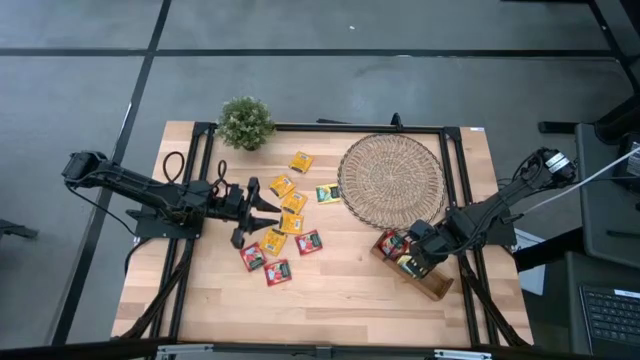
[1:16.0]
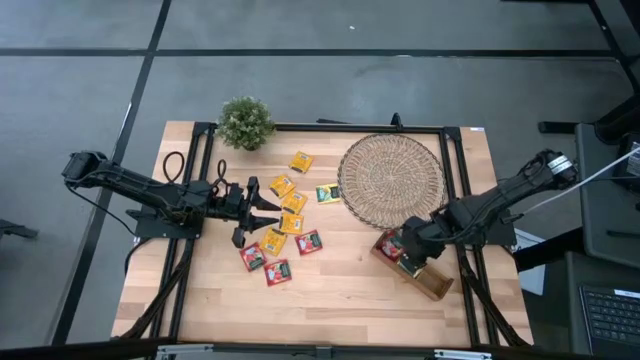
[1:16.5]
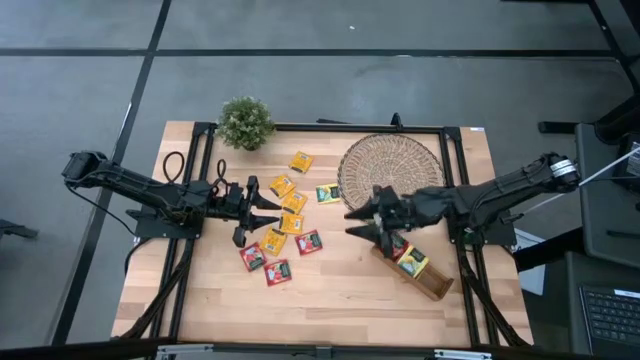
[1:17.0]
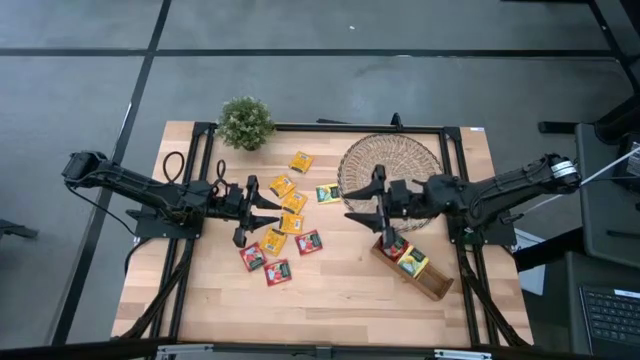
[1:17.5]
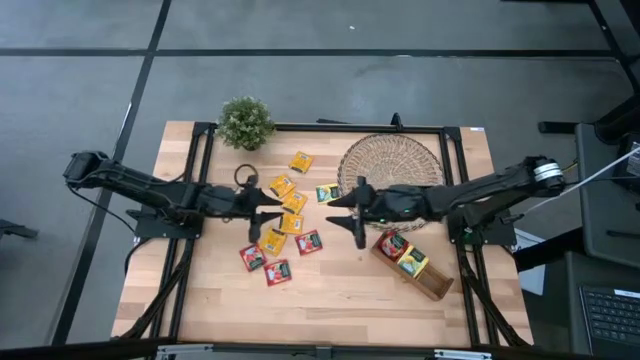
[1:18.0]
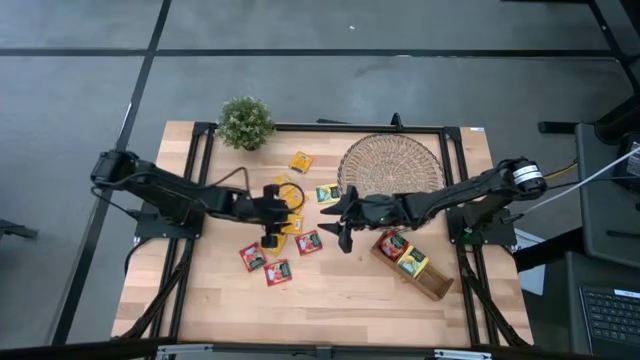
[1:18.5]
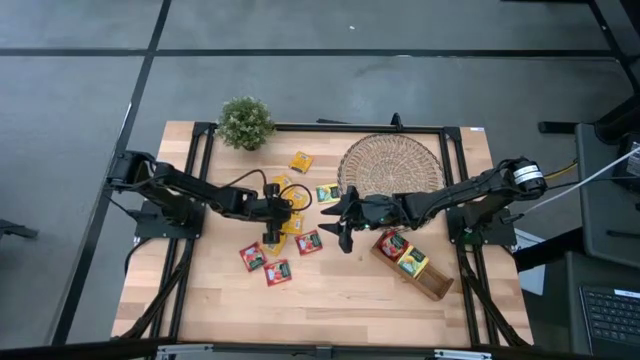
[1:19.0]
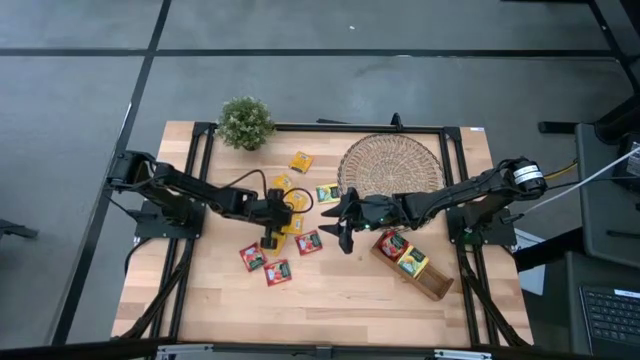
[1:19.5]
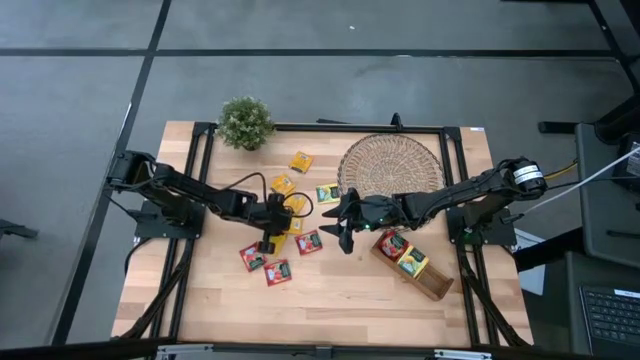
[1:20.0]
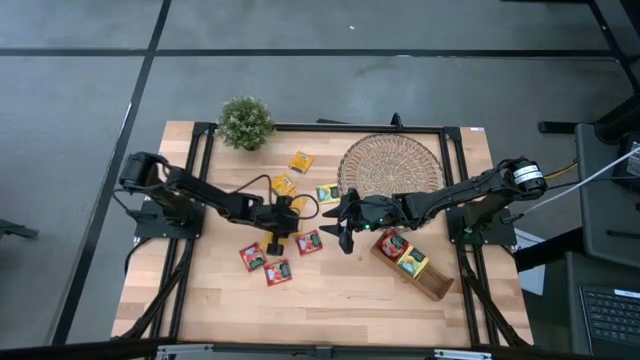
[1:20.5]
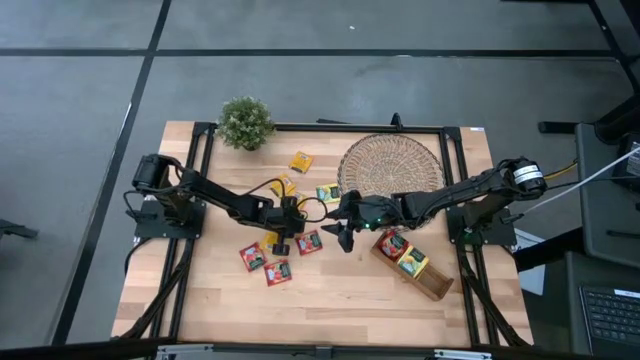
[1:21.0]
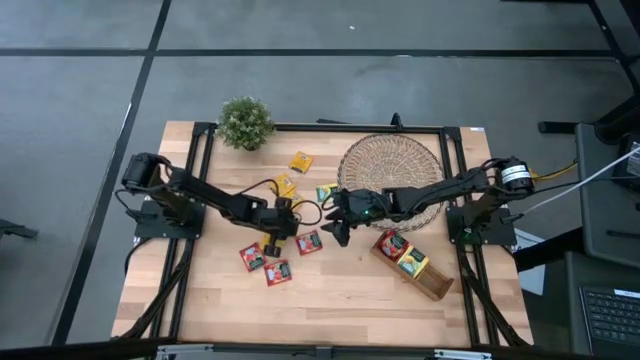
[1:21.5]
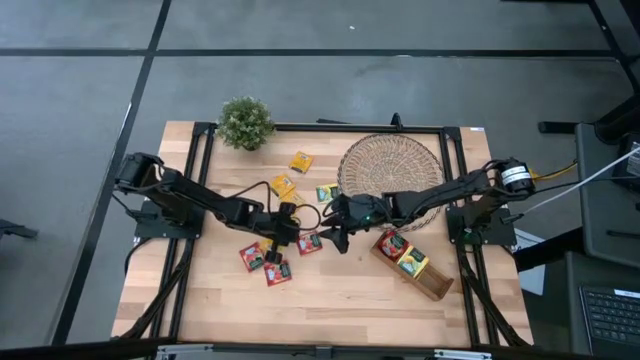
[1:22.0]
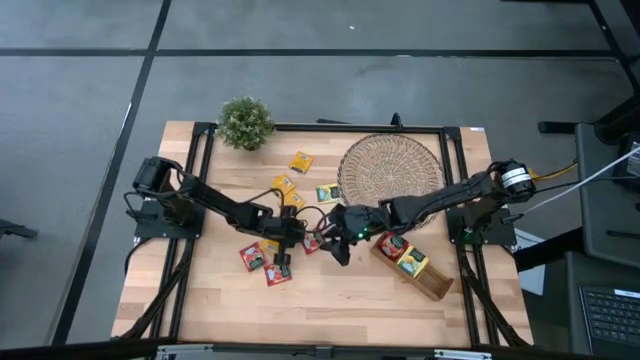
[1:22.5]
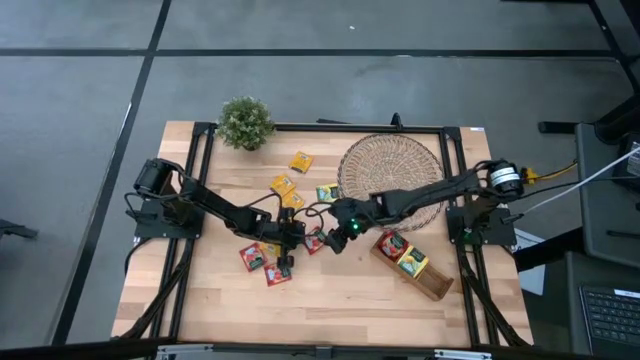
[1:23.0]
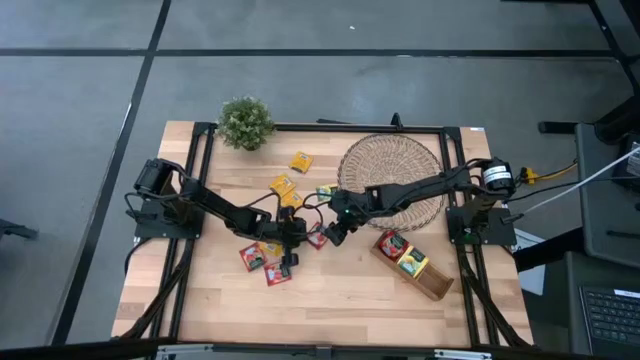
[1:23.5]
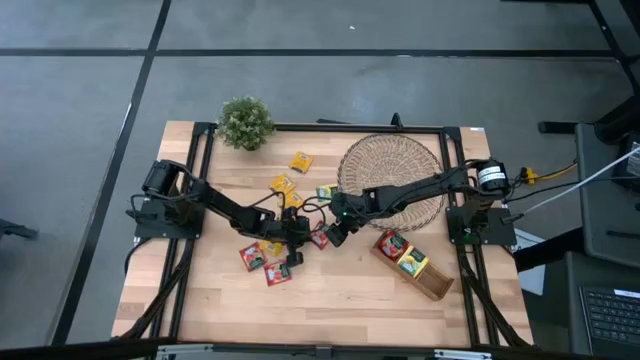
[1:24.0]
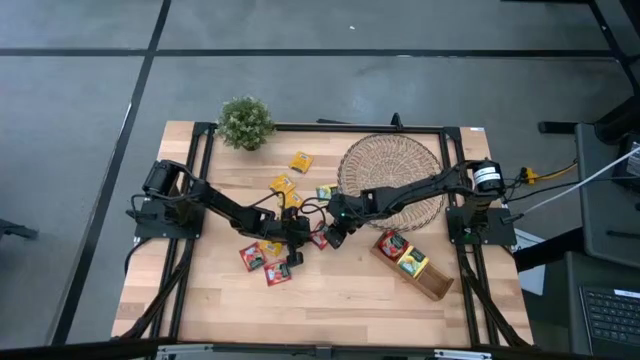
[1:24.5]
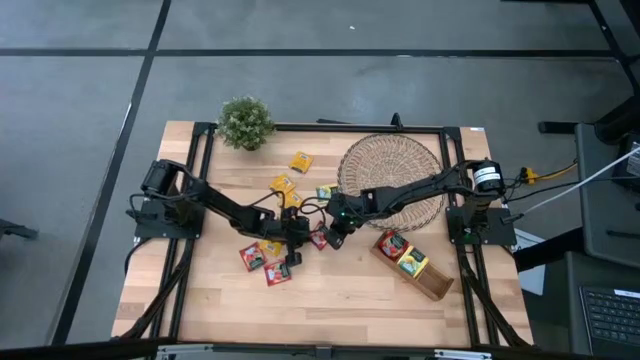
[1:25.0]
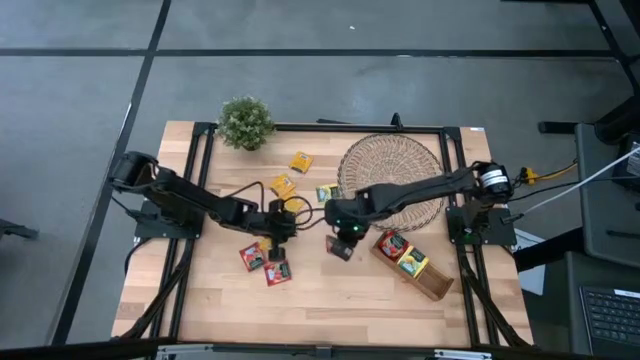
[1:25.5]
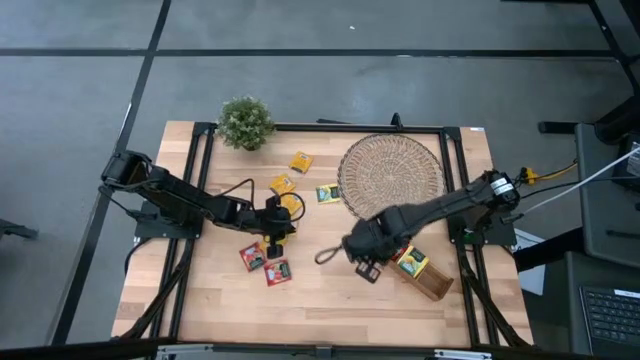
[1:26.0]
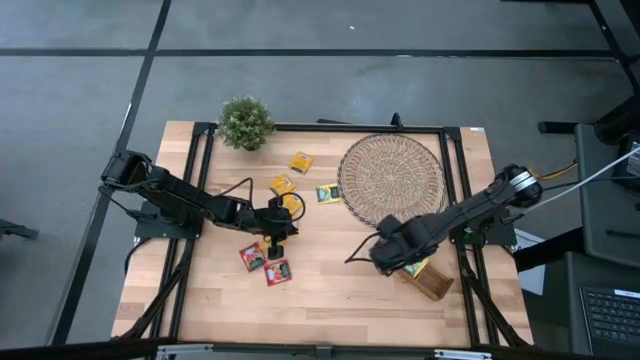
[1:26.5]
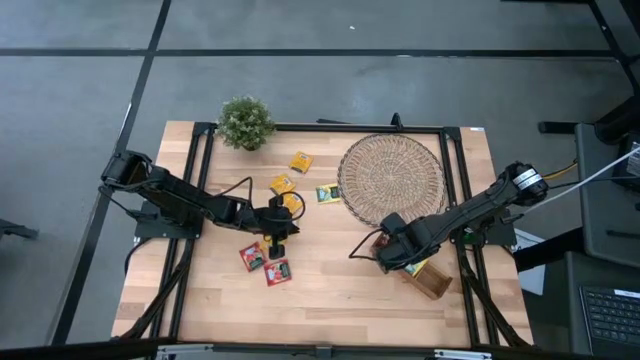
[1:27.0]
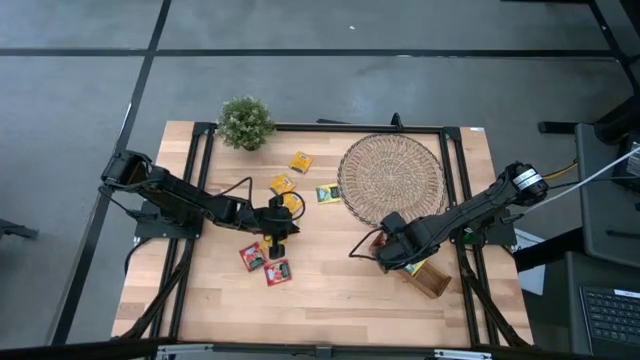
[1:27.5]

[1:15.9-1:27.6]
Task: Pick & Place Tea
Put the top right red tea bag into the left slot of the wooden organizer

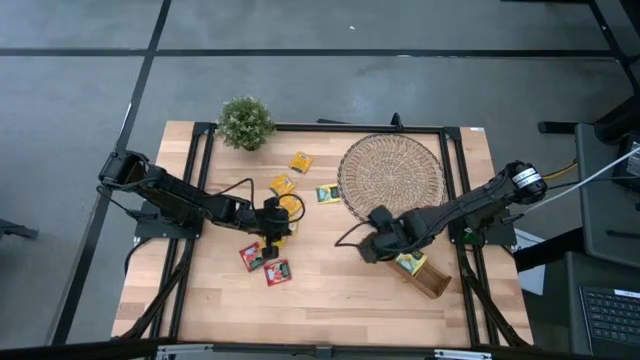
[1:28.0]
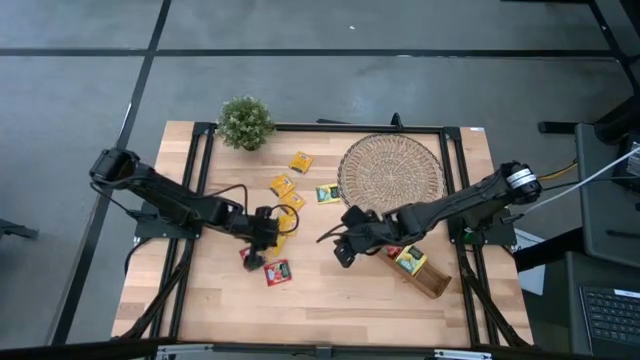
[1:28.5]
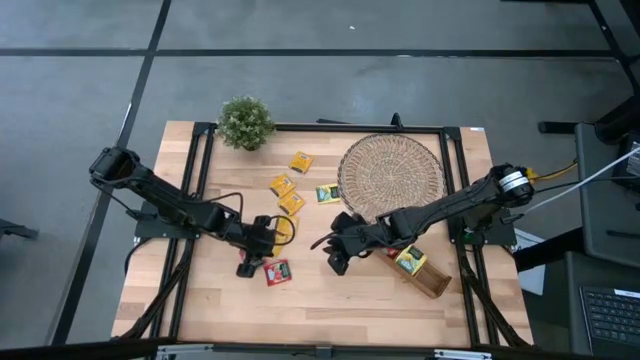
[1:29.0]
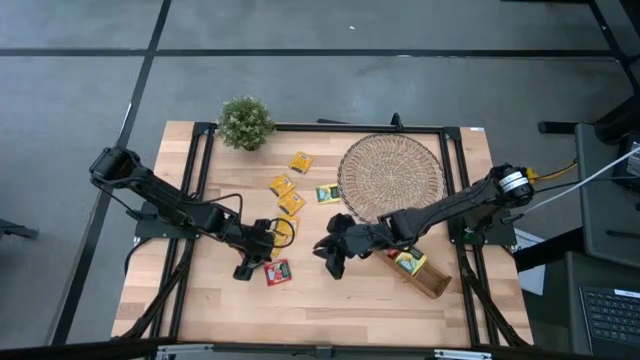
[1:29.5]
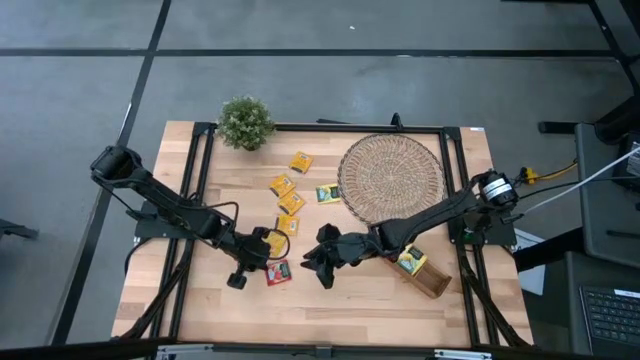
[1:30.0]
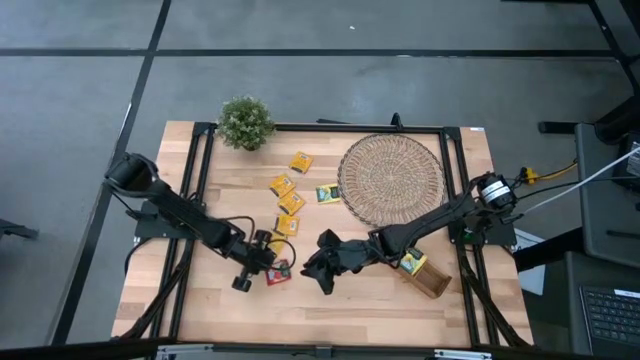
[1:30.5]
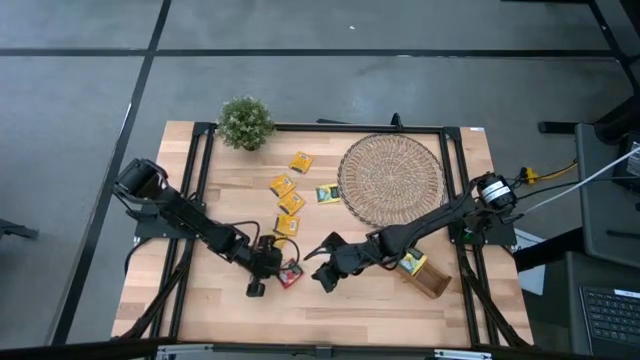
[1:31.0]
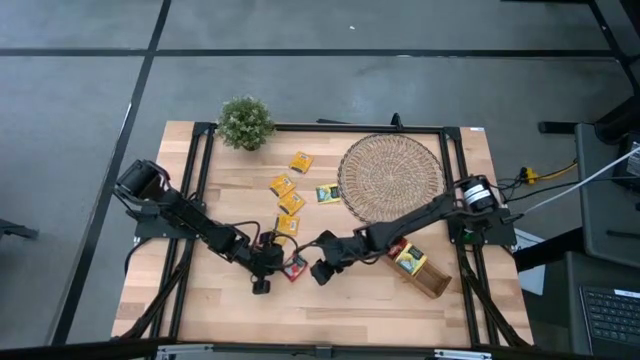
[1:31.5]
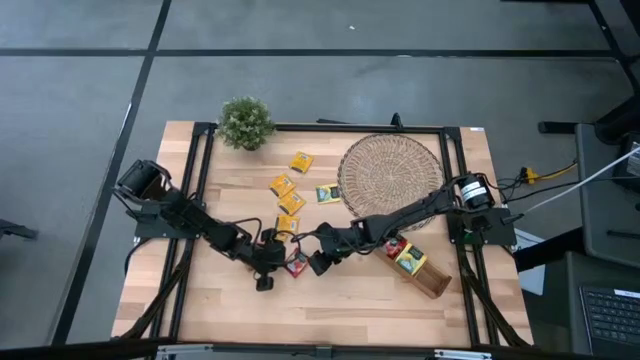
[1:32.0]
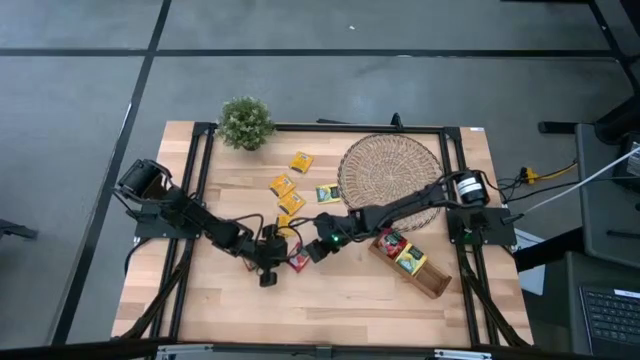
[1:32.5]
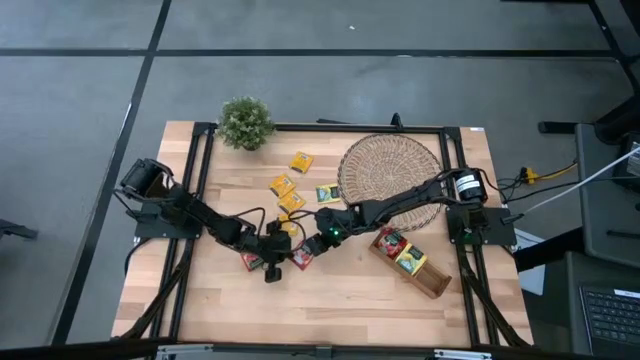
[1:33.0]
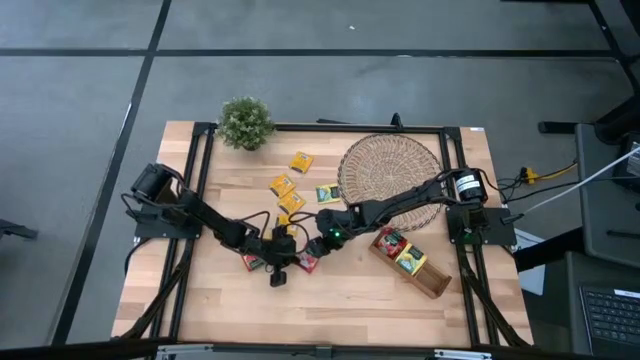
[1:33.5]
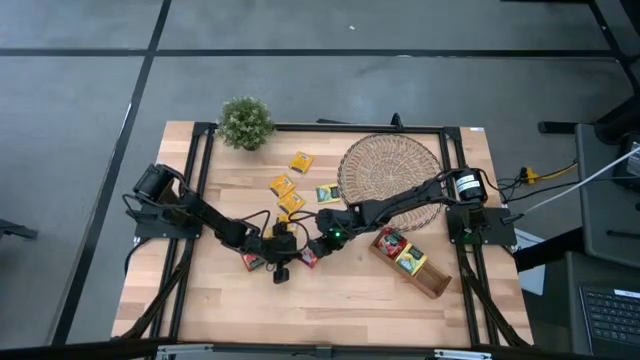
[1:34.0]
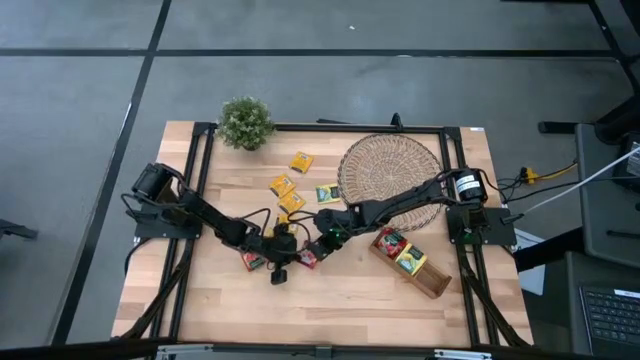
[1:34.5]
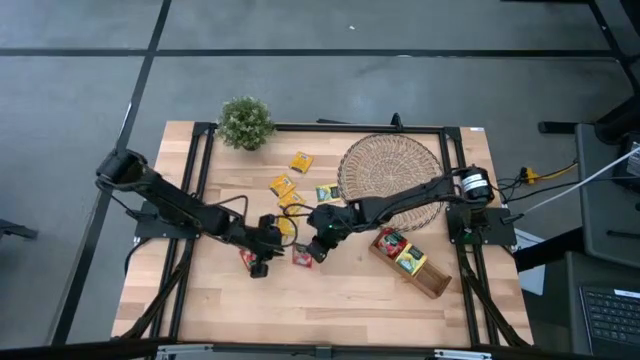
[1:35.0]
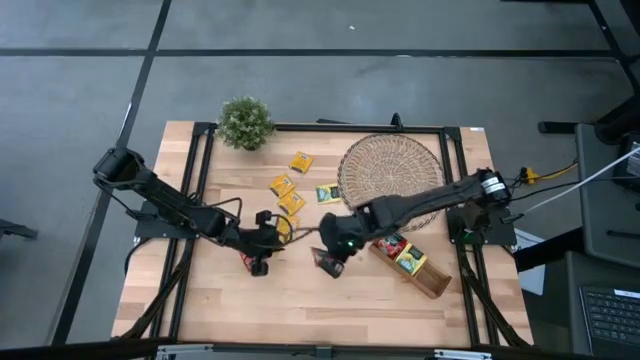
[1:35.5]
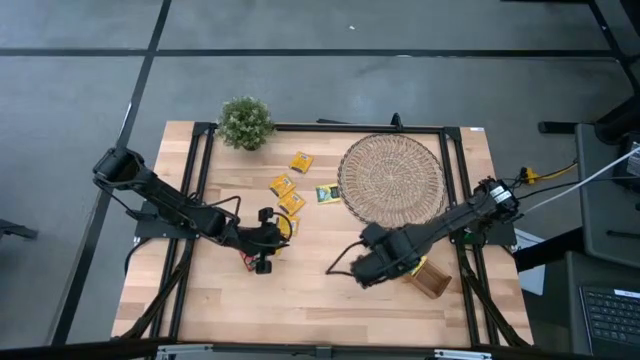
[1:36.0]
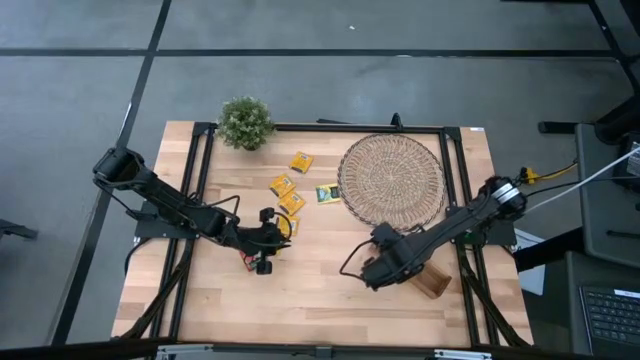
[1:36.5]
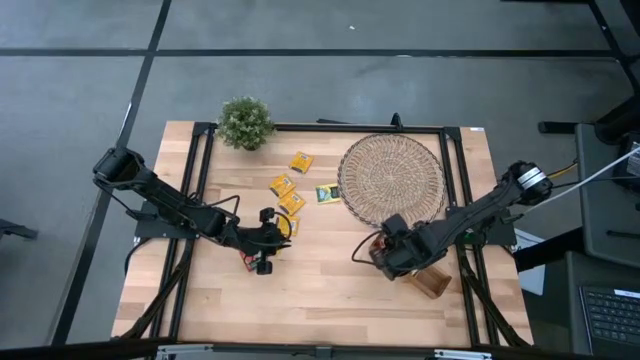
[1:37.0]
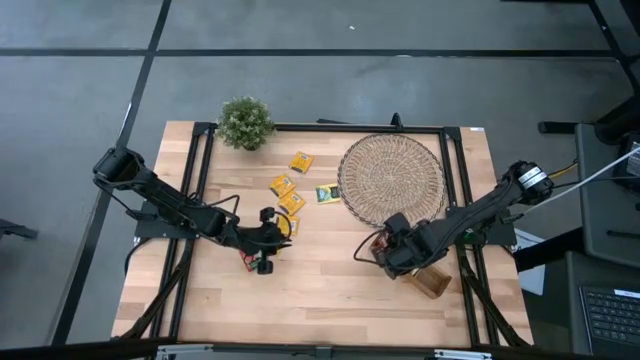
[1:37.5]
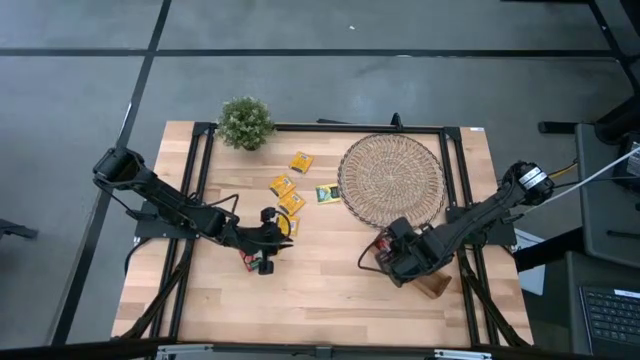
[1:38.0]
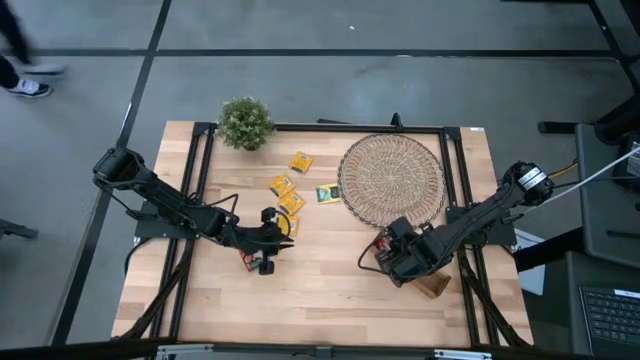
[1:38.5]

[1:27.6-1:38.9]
Put the bottom red tea bag into the left slot of the wooden organizer
